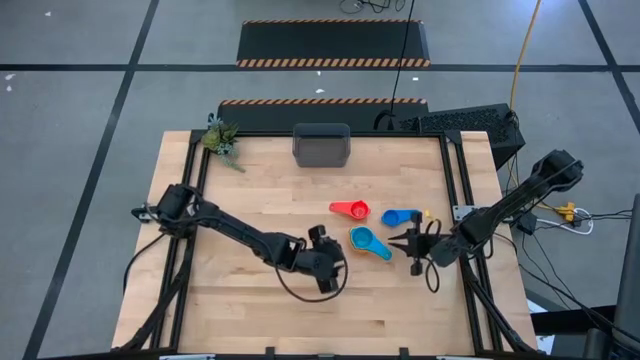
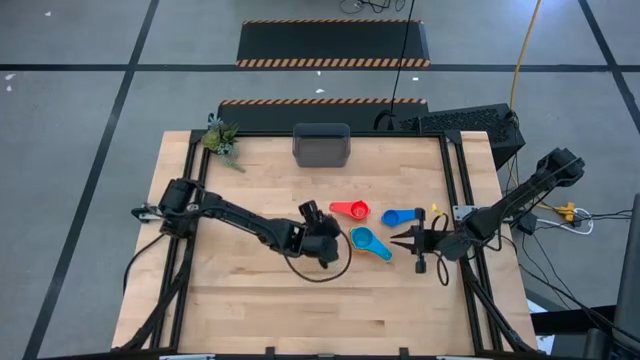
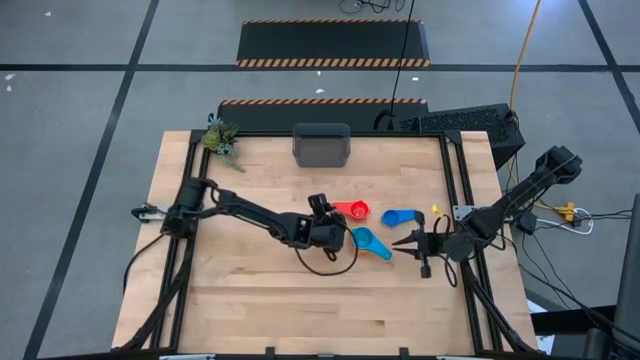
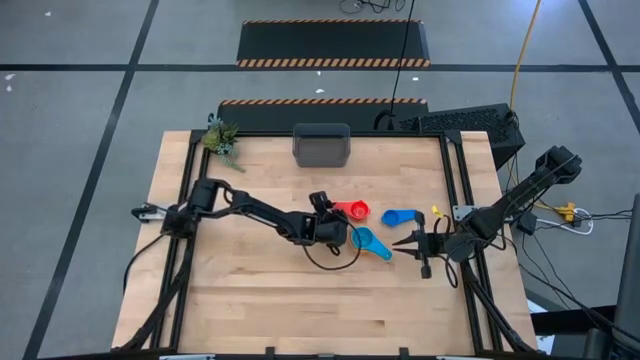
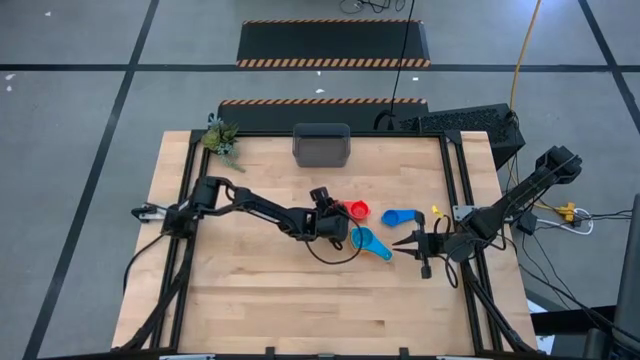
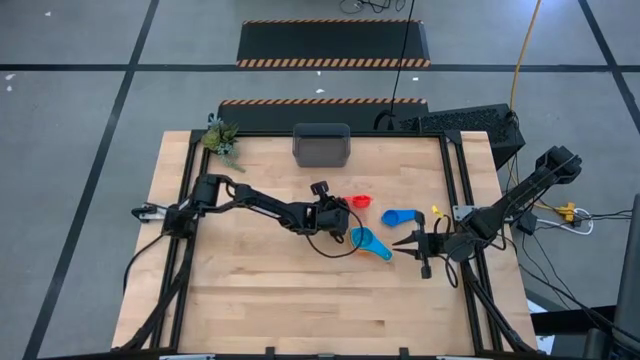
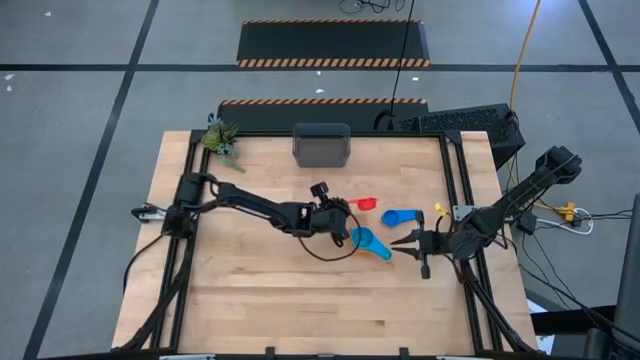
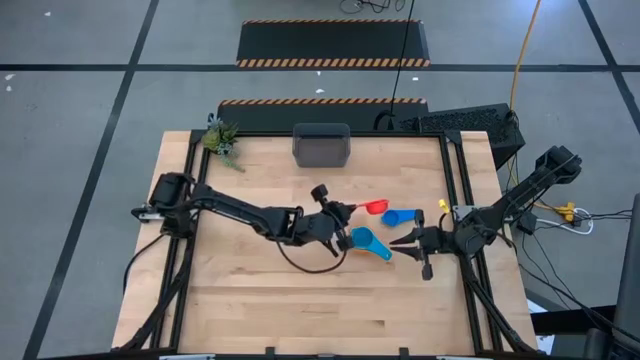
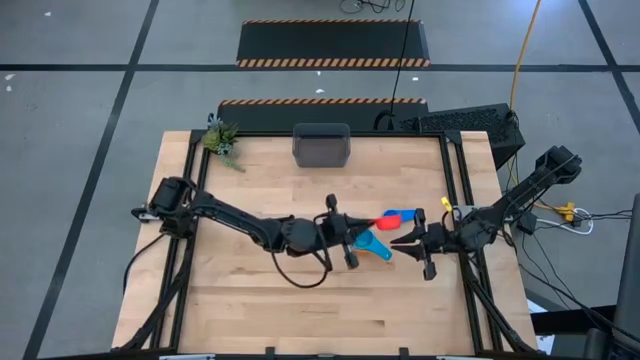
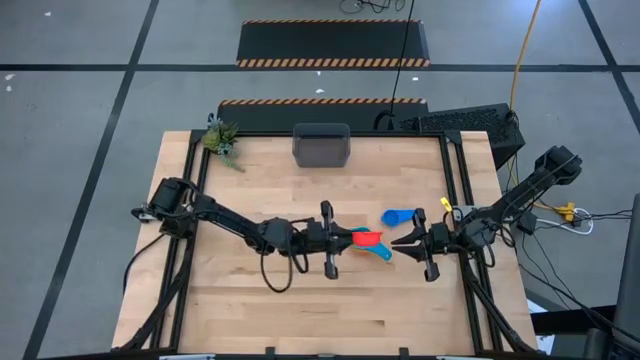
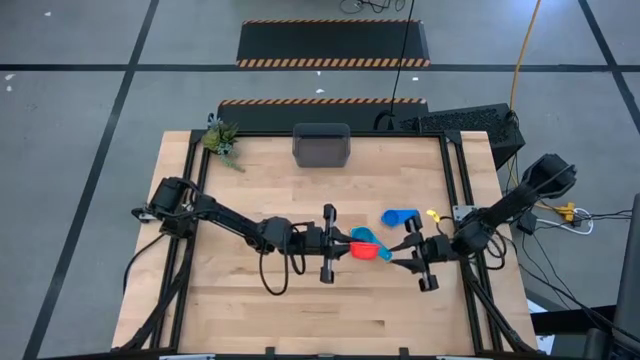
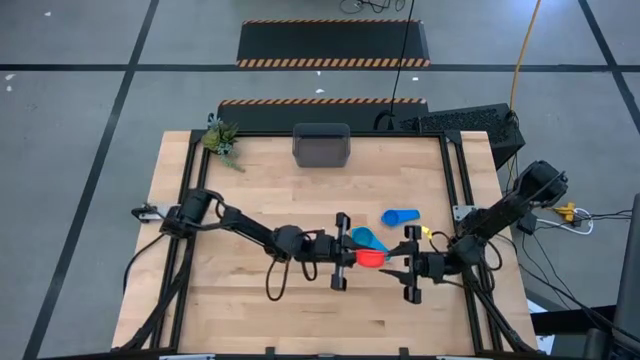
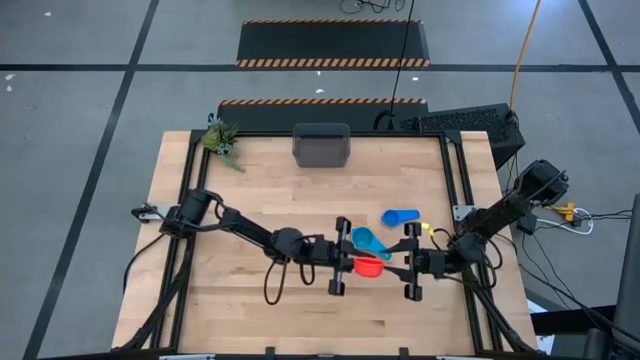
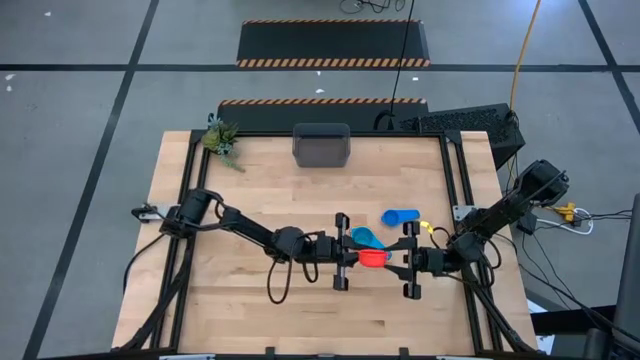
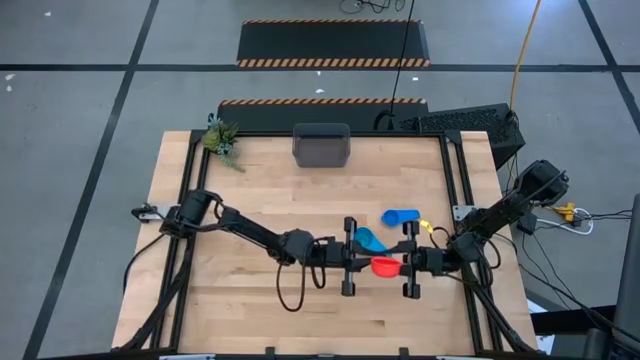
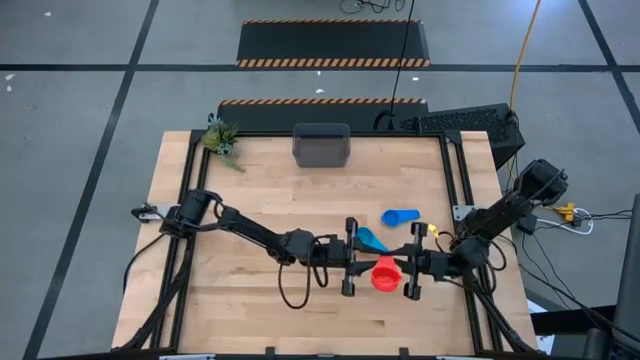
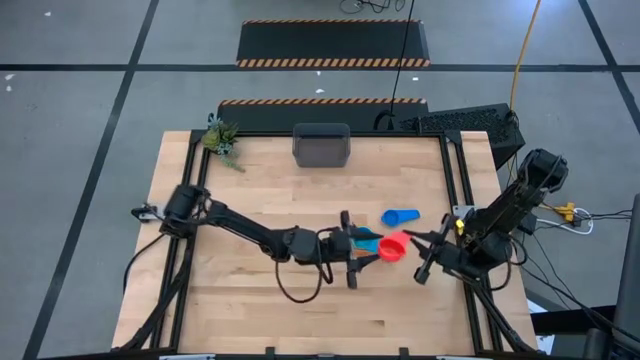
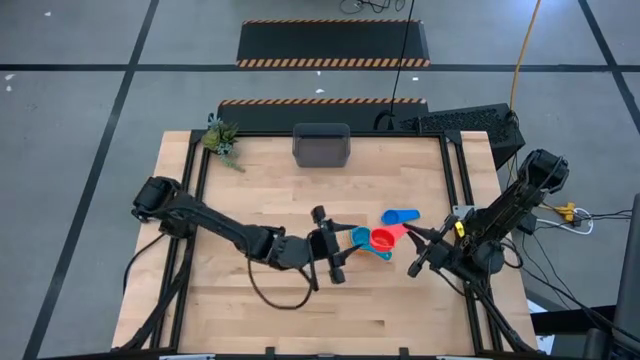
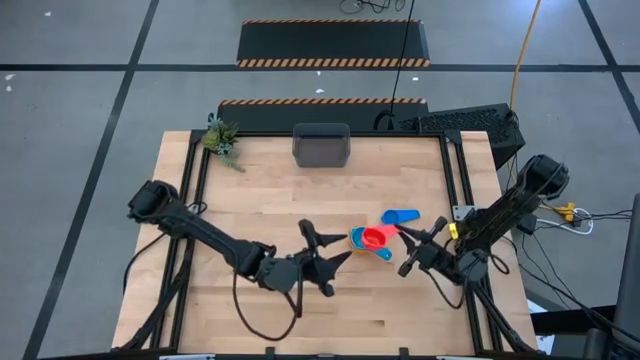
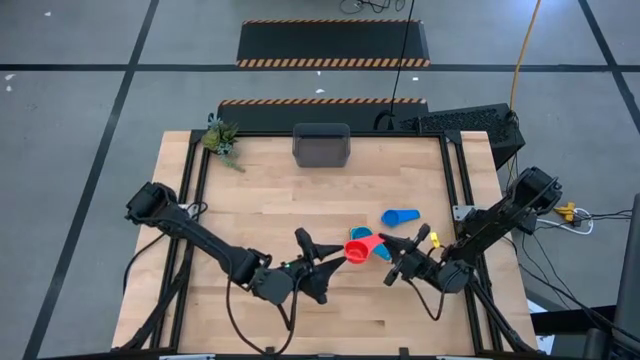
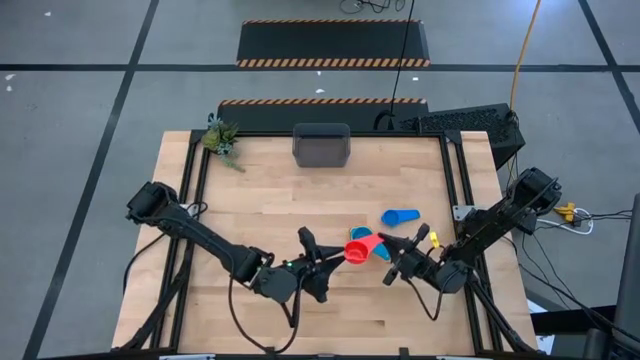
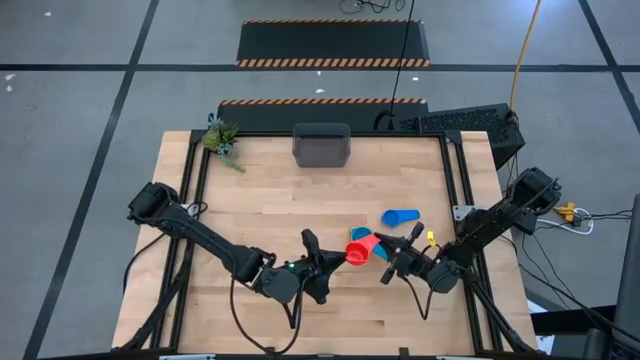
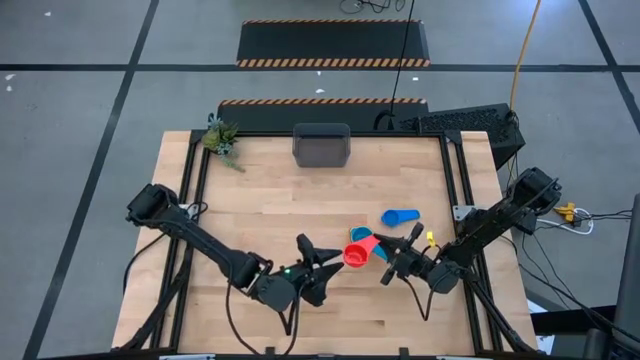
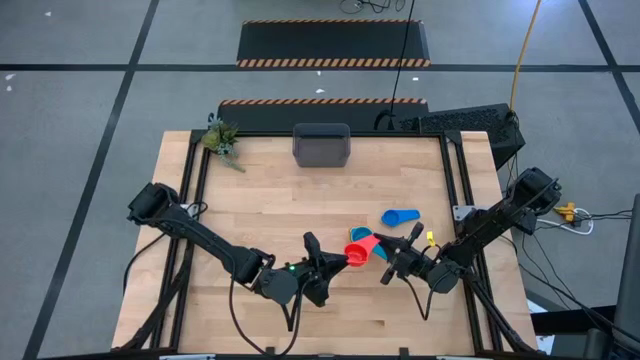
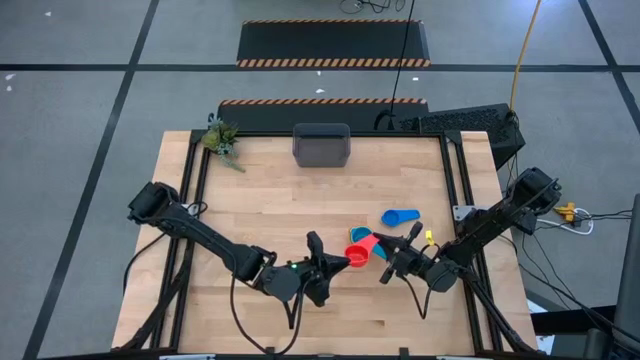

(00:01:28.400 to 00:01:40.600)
Task: Nest measuring cups in basket
Stack the red measuring cup on top of the light blue measuring cup

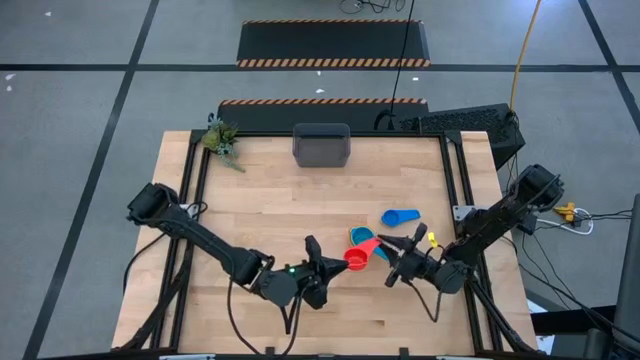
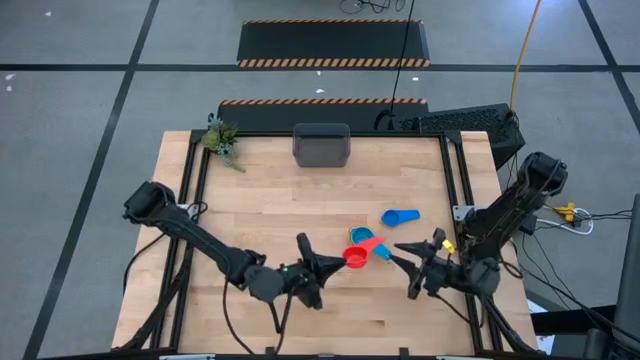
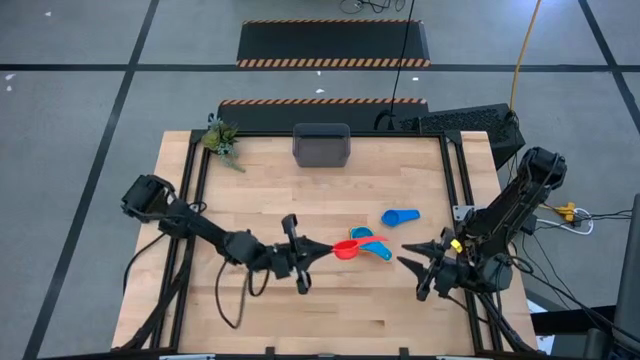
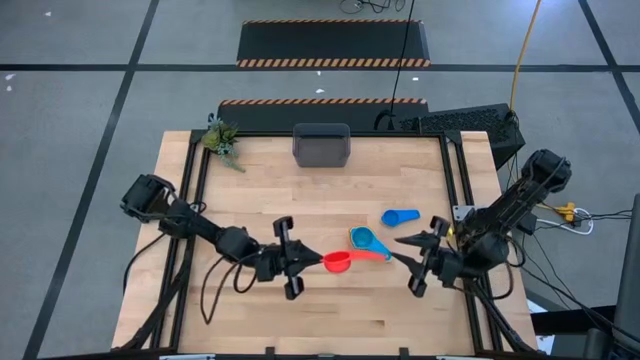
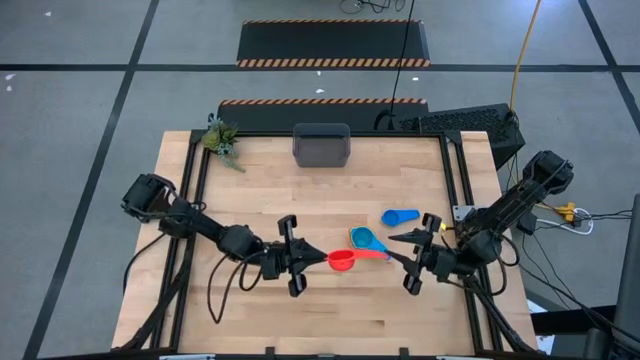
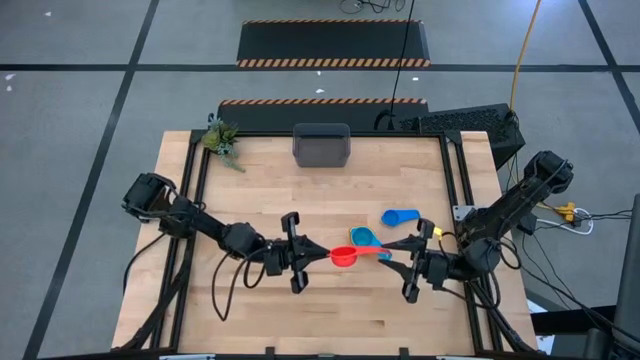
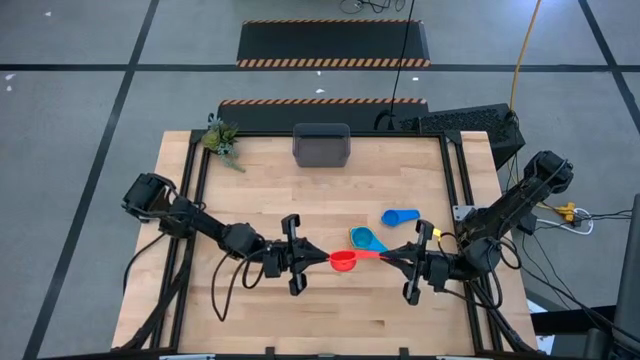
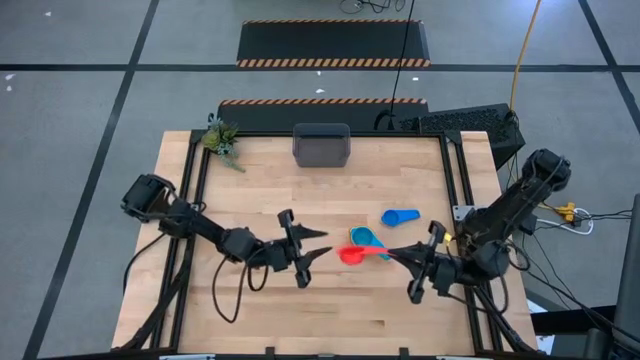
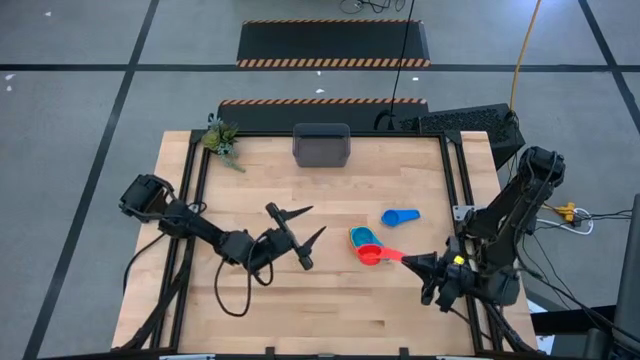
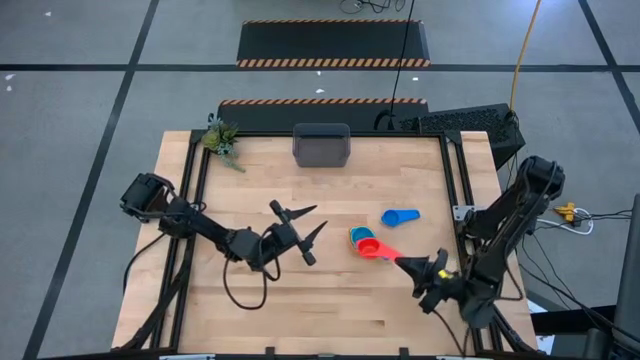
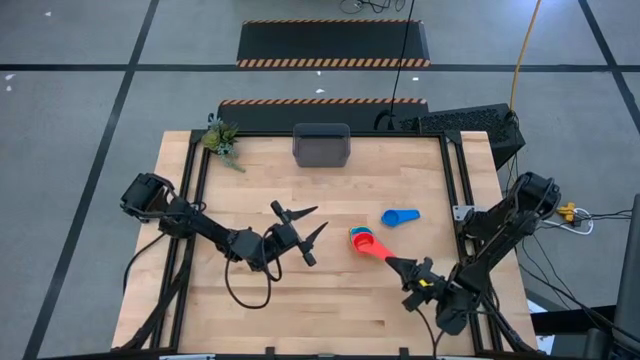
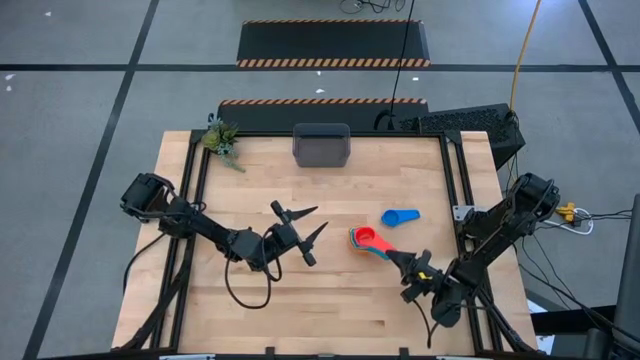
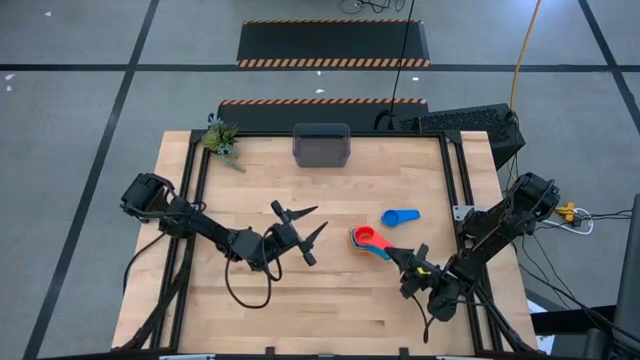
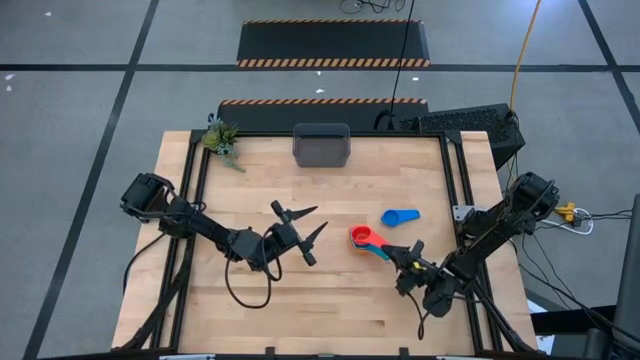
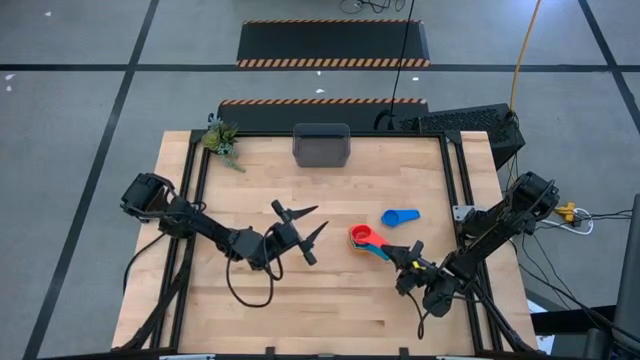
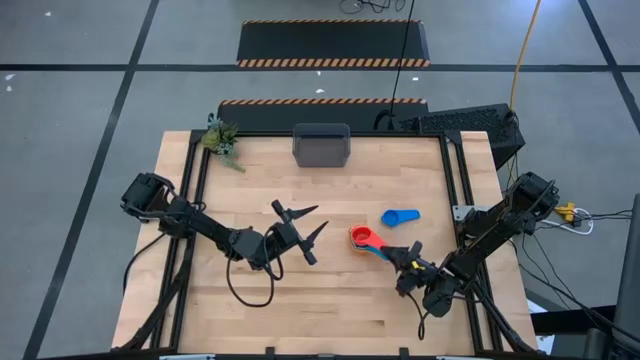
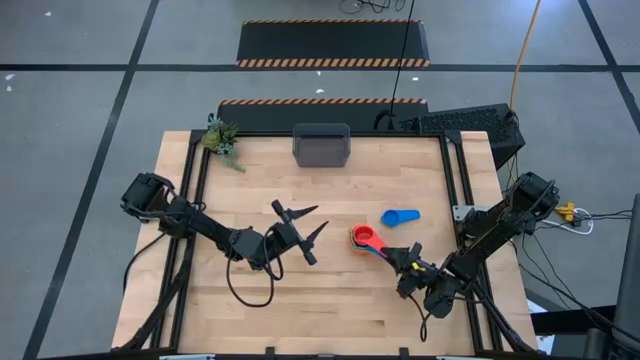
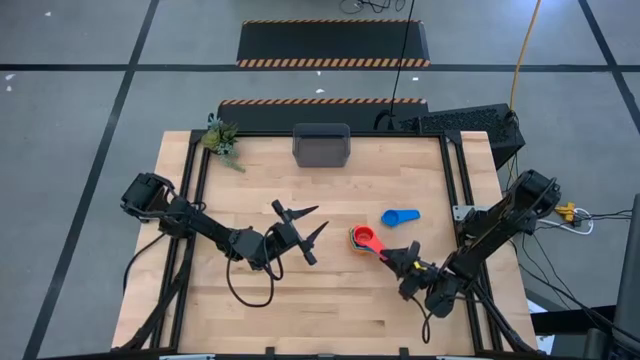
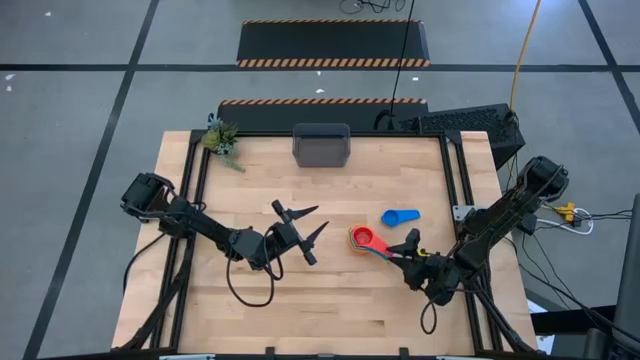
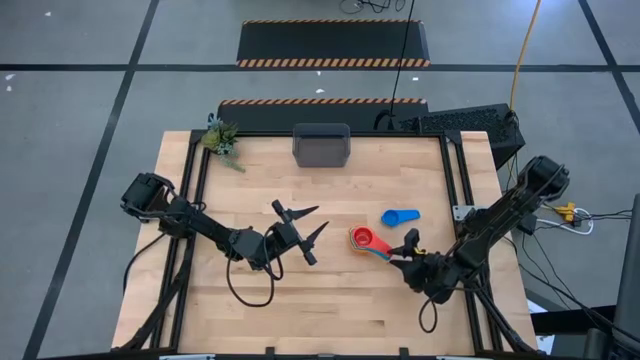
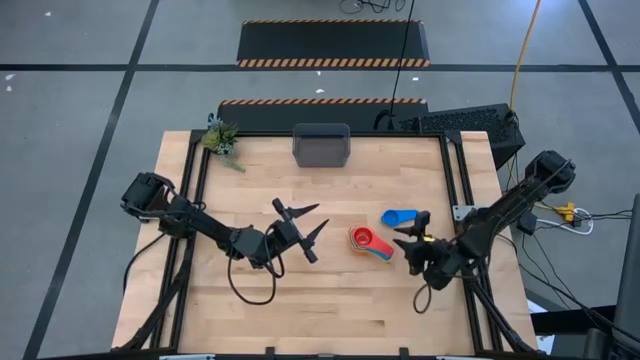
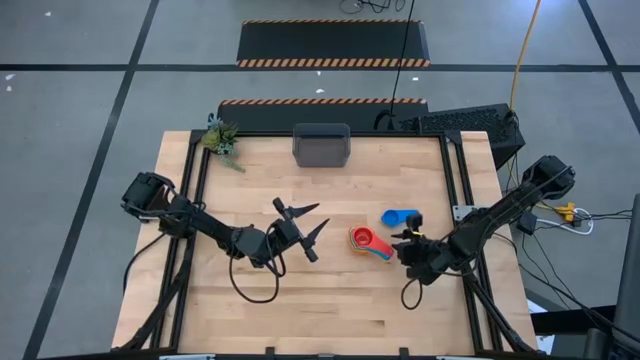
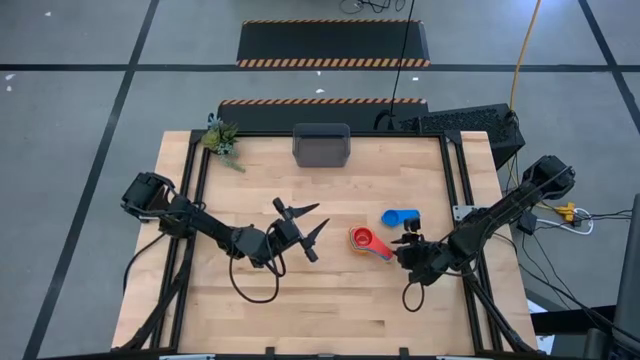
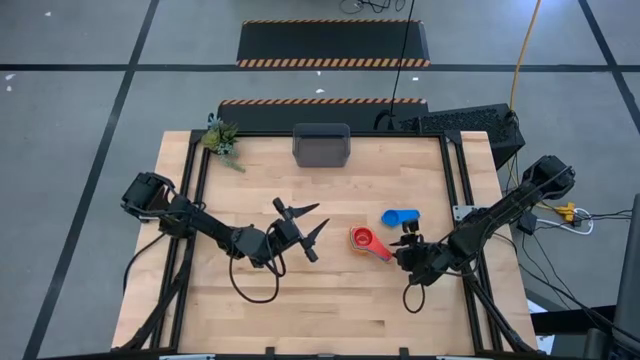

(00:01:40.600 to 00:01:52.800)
Stack the red measuring cup on top of the light blue measuring cup
